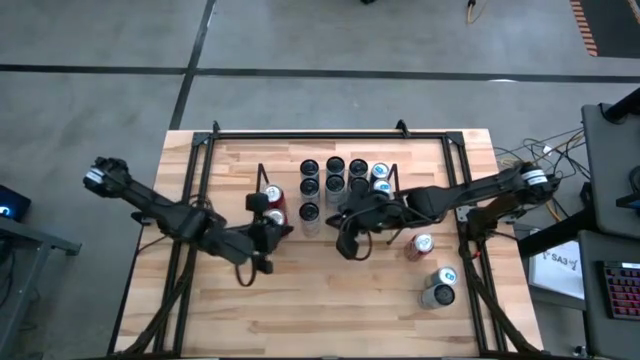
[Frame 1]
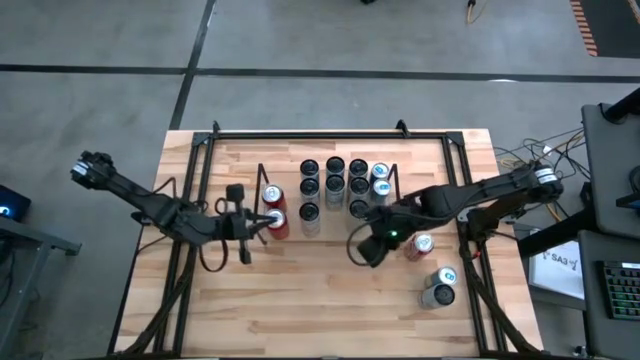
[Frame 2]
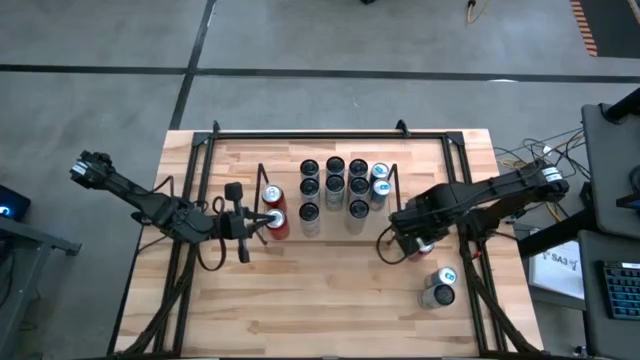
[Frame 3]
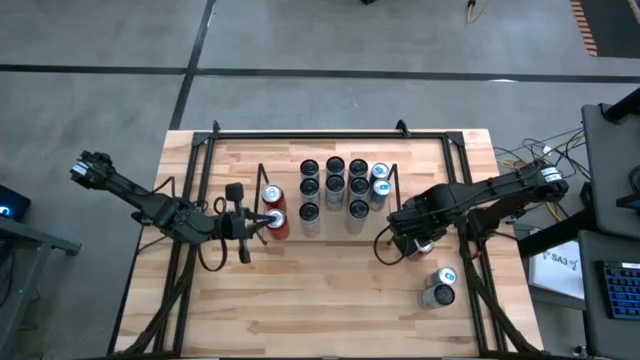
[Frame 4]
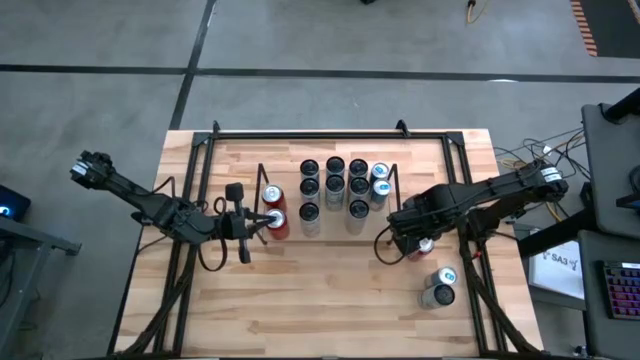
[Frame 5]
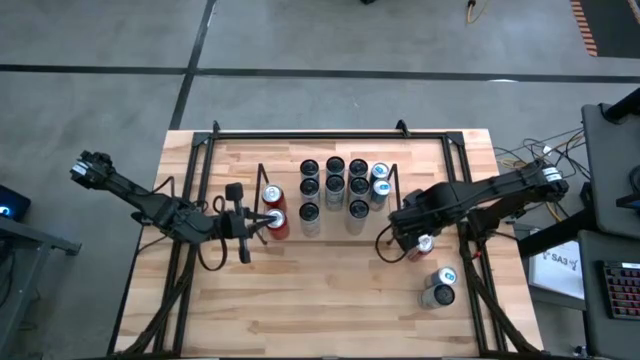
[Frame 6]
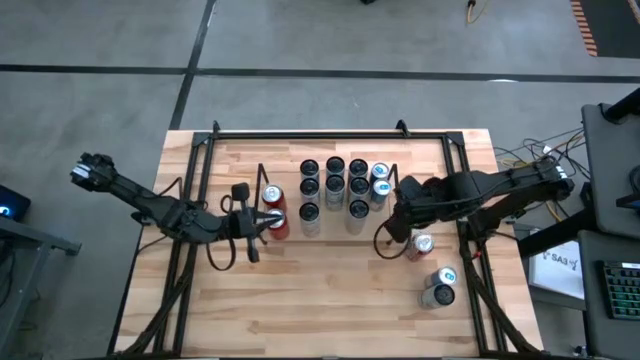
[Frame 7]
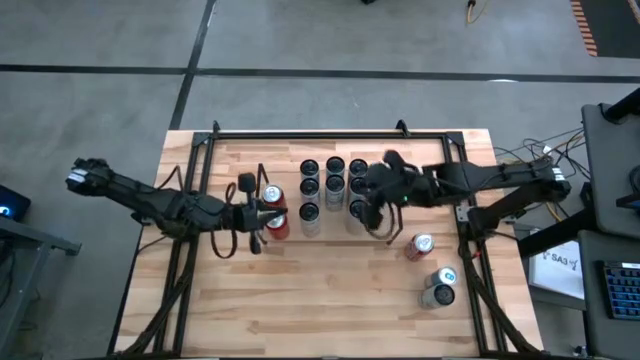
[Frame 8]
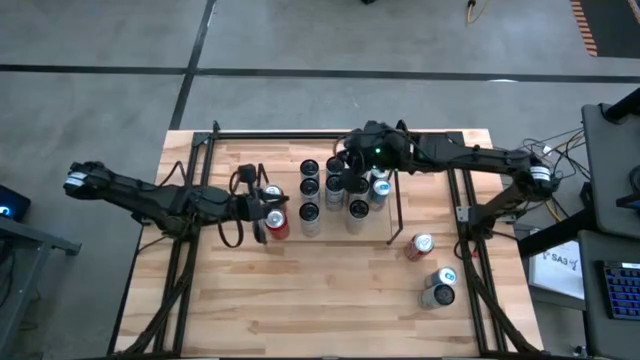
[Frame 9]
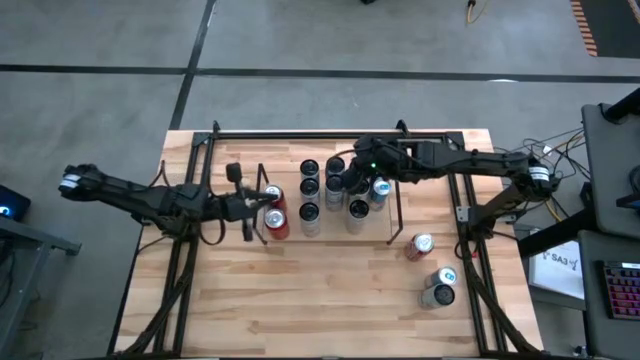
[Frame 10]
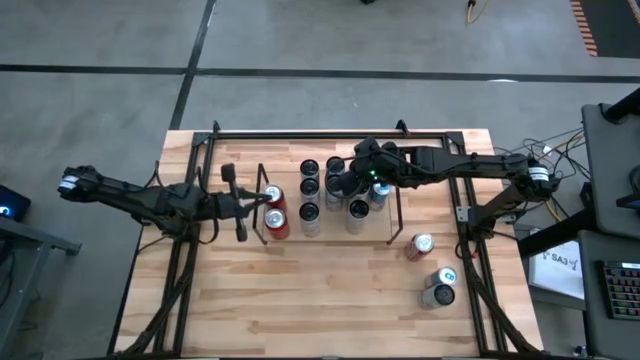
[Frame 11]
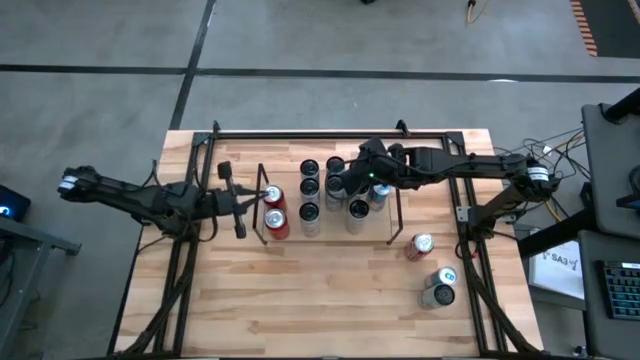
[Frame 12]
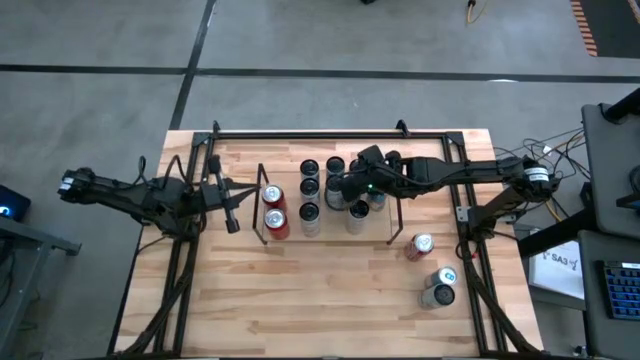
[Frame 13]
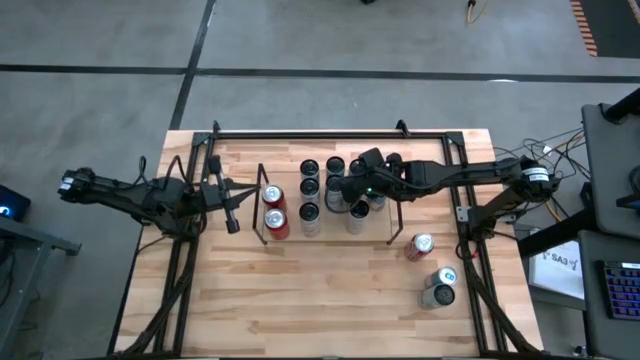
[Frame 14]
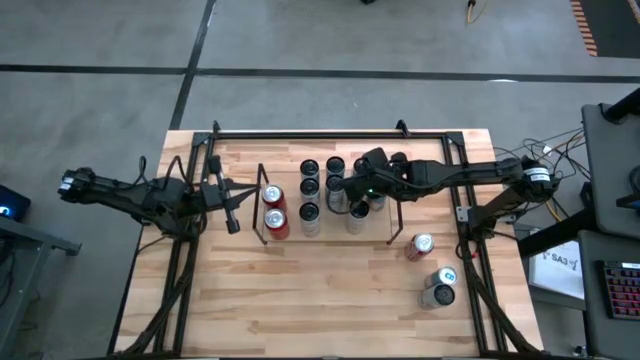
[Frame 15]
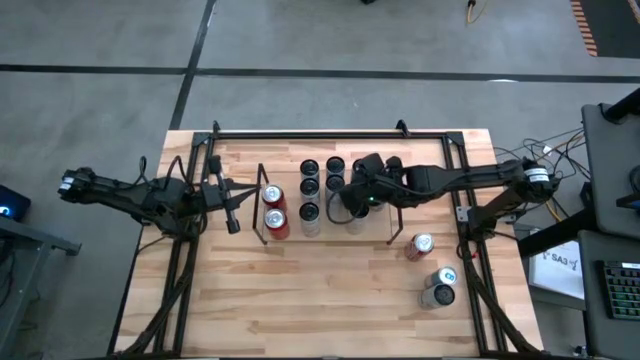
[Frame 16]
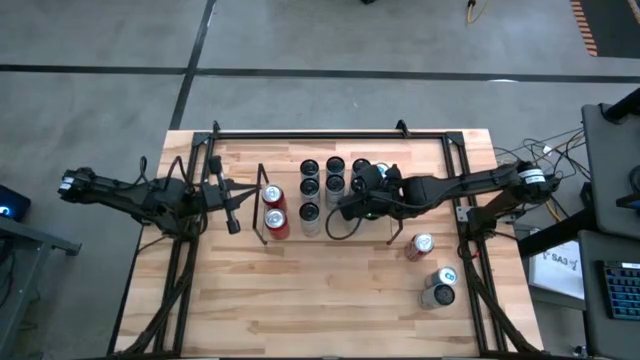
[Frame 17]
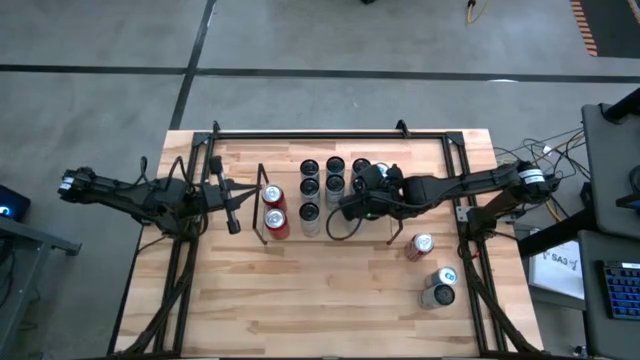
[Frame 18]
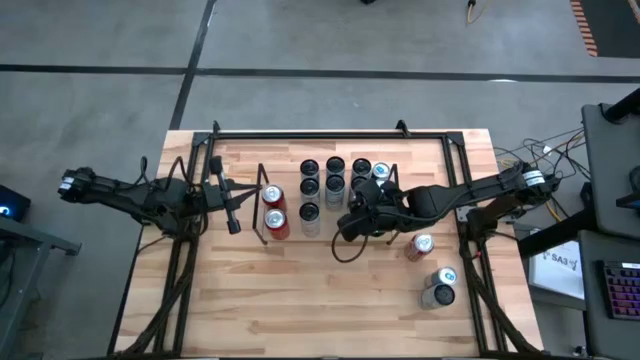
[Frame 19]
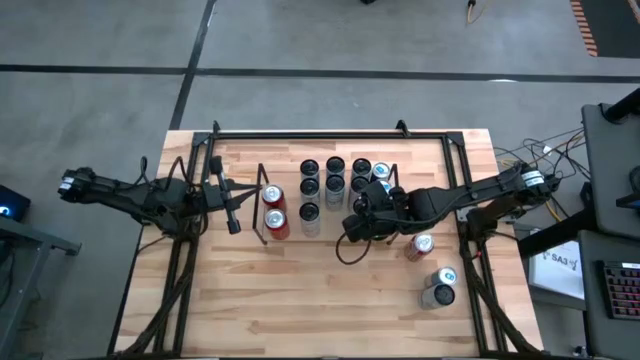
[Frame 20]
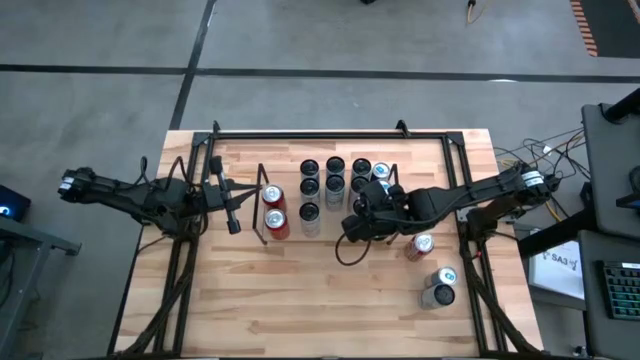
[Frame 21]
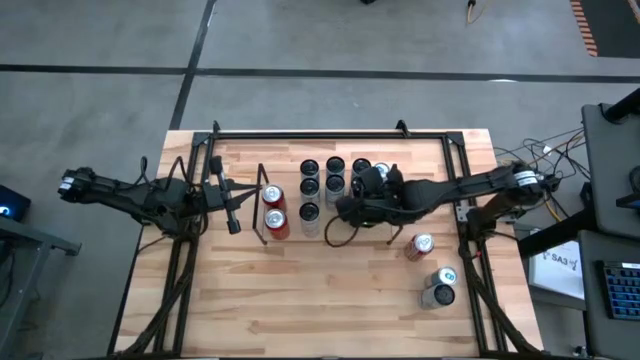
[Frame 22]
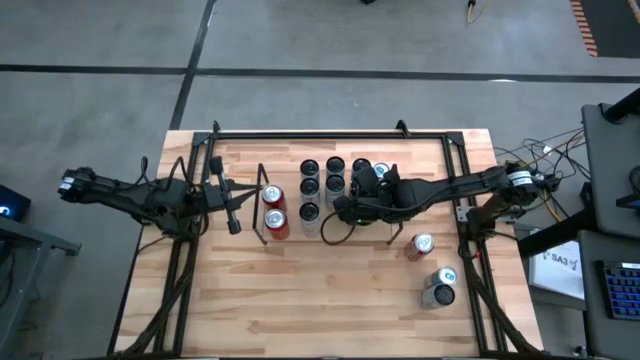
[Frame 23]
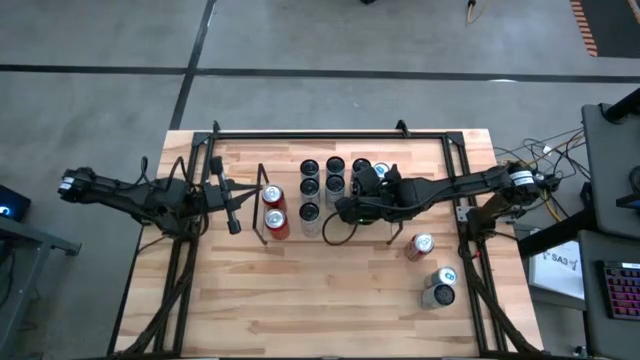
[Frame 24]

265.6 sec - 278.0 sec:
Task: Place canned beverage on shelf
Adjust the white and yellow soda cans

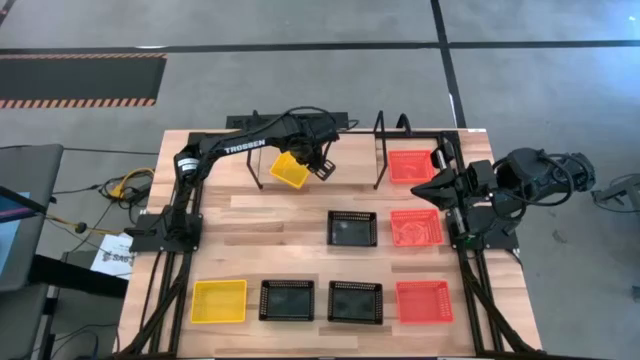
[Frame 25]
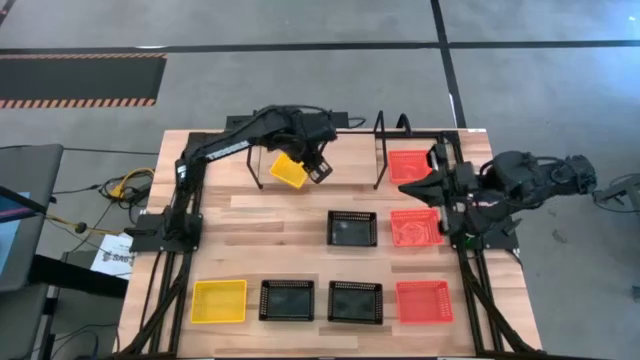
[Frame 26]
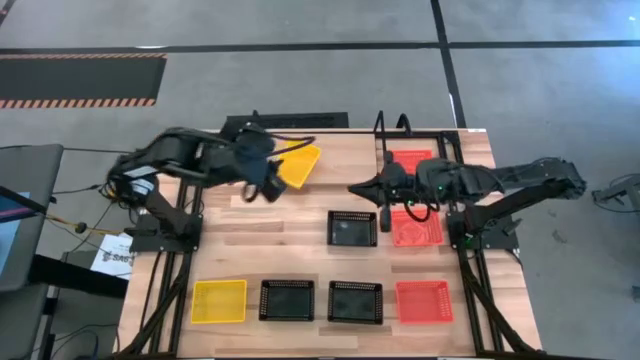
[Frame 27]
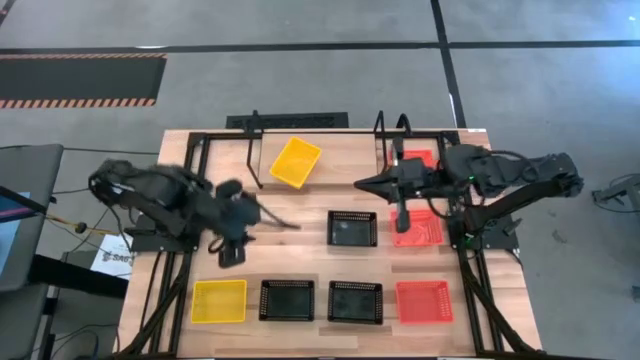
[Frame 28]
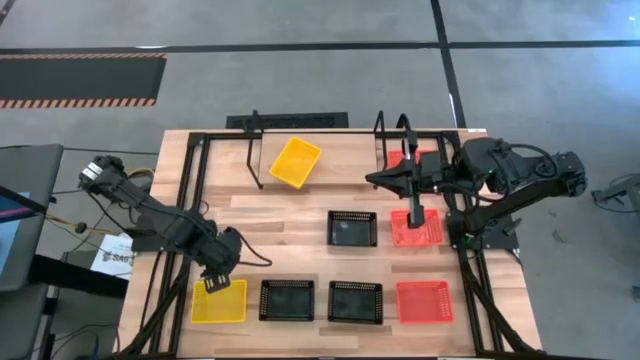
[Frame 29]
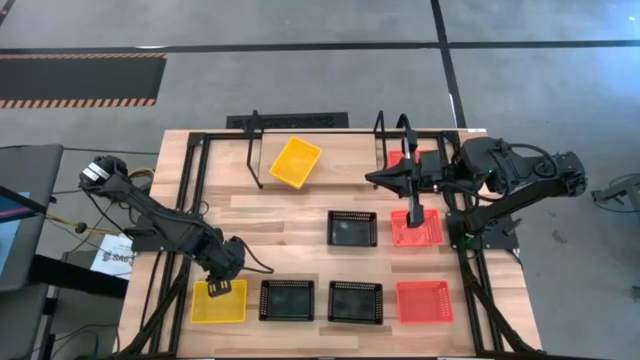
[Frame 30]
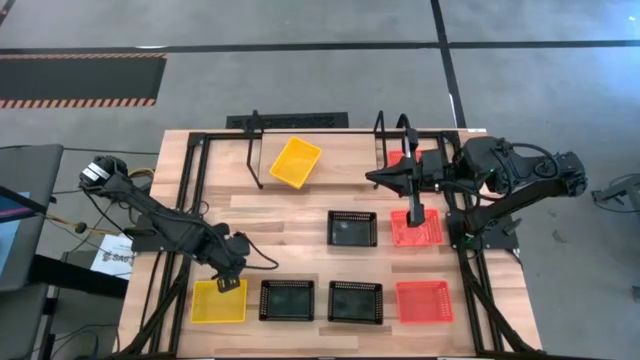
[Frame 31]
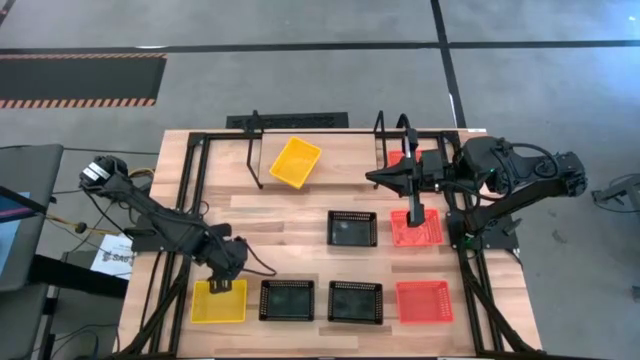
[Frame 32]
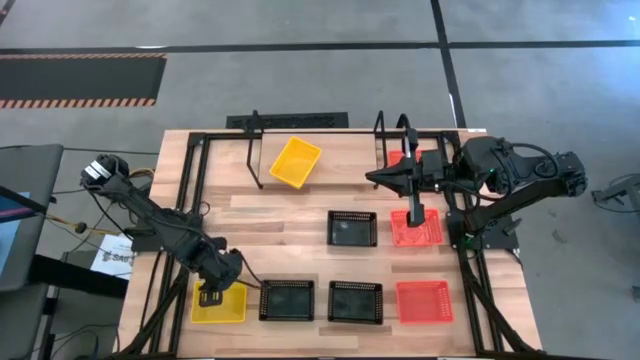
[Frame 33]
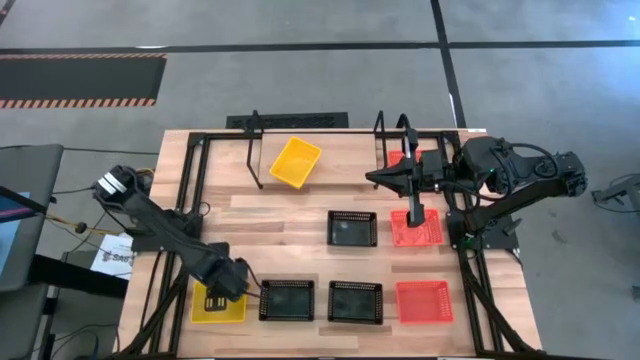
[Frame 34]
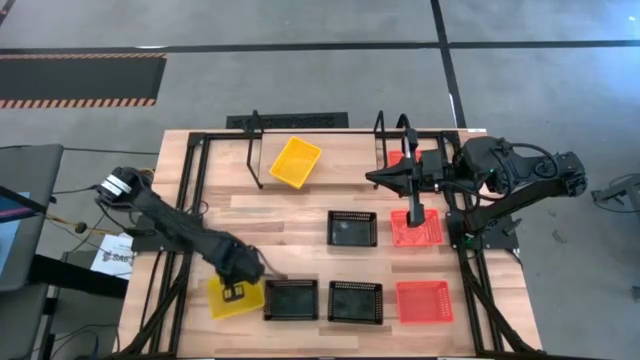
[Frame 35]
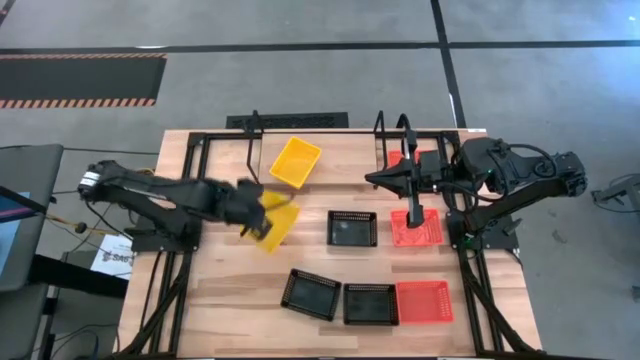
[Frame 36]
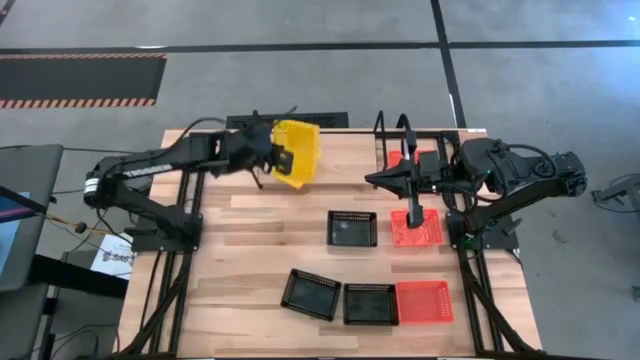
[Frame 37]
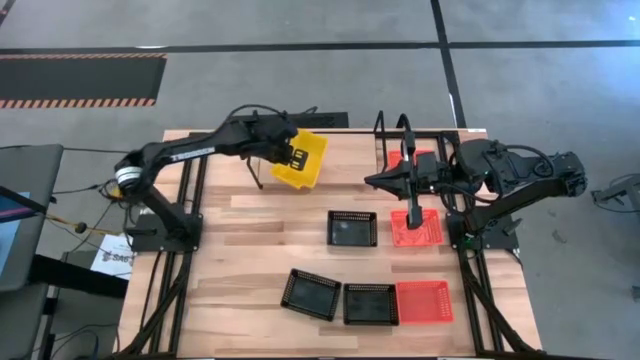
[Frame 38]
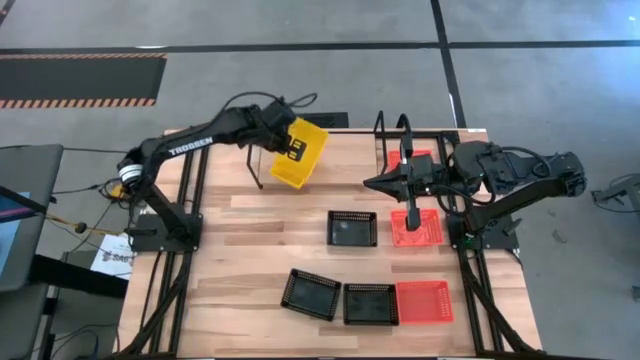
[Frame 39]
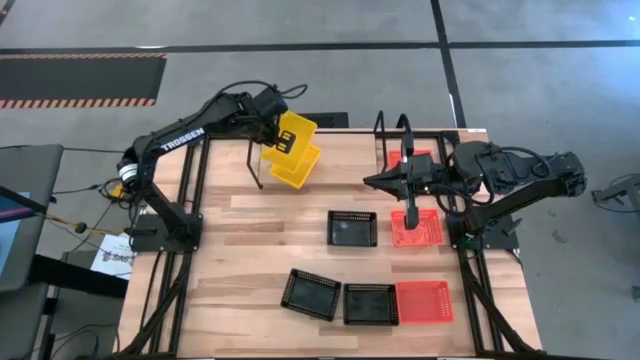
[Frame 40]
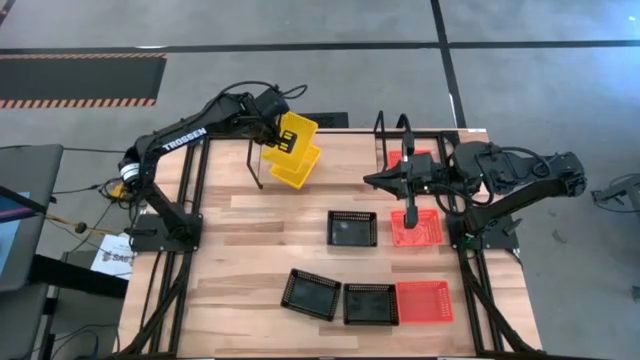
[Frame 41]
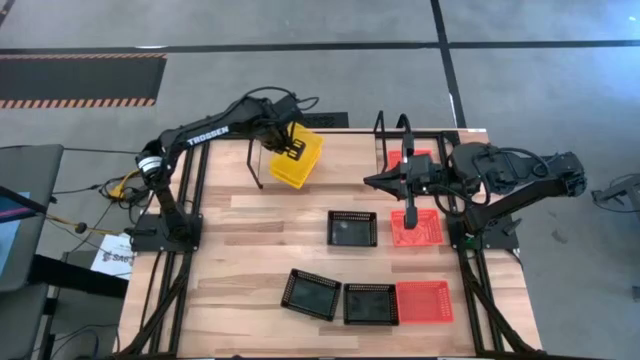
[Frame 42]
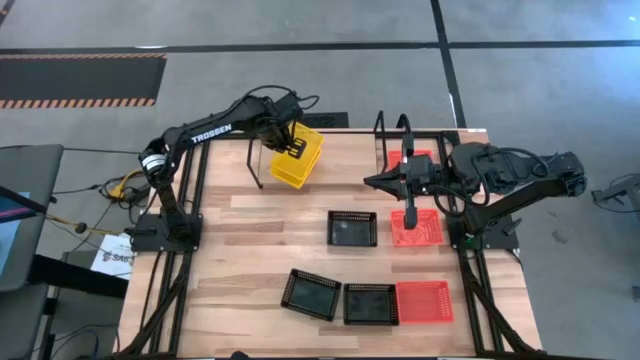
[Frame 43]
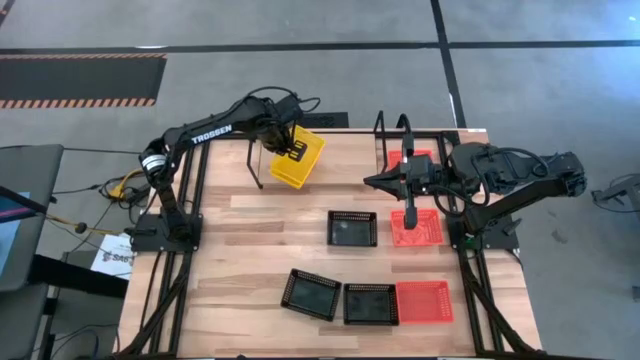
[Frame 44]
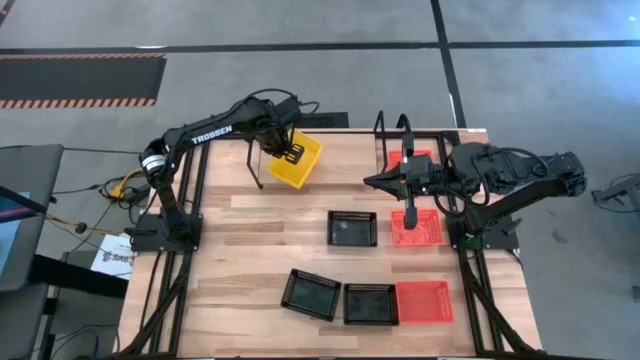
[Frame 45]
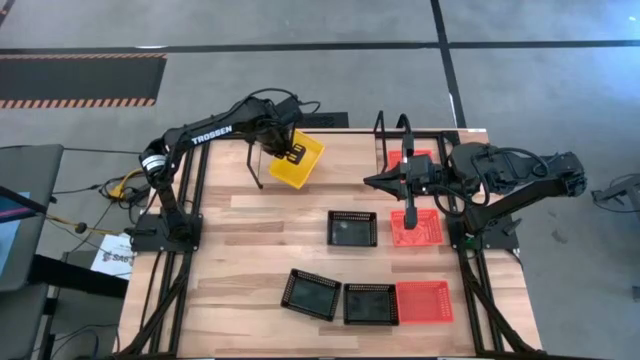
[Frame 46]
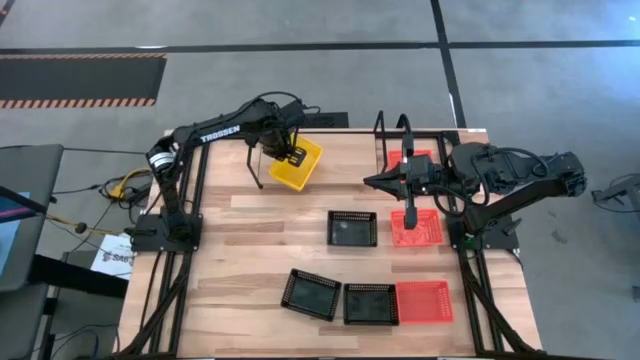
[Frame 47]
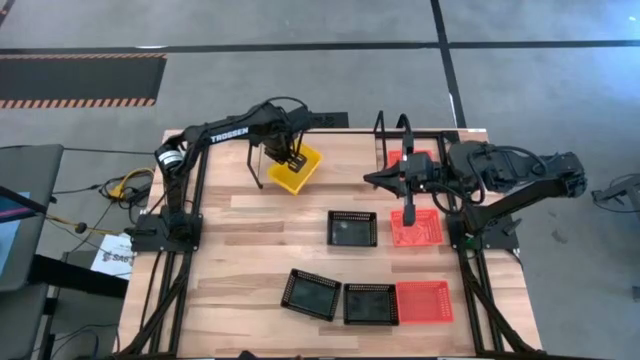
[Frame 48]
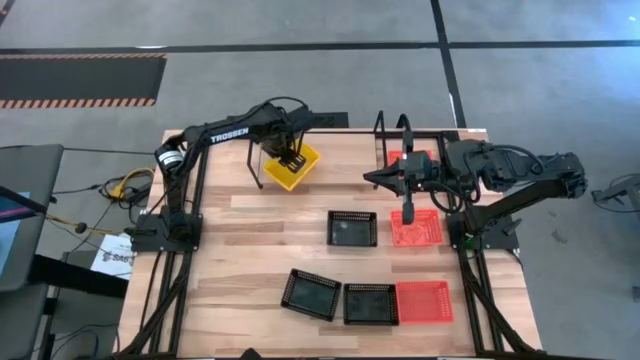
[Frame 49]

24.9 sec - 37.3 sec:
Task: Stack baskets on shelf by color
Stack the yellow bin on top of the other yellow bin on the shelf
